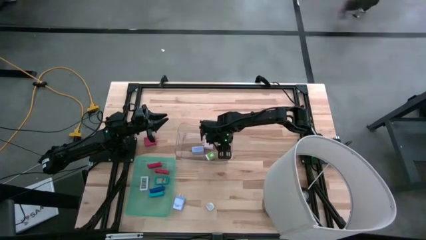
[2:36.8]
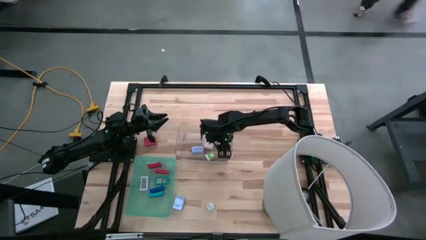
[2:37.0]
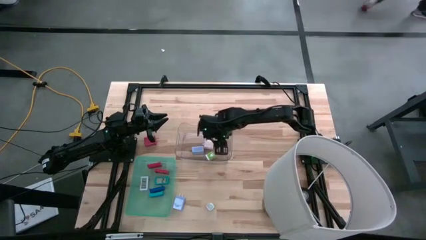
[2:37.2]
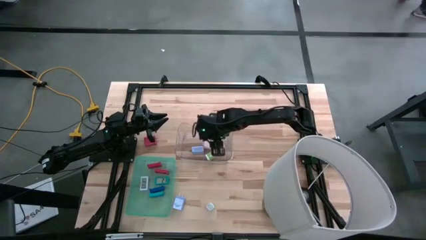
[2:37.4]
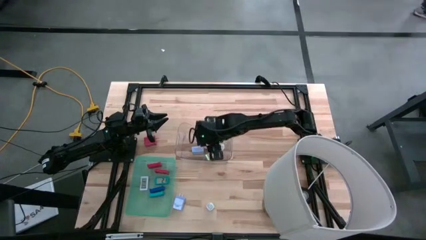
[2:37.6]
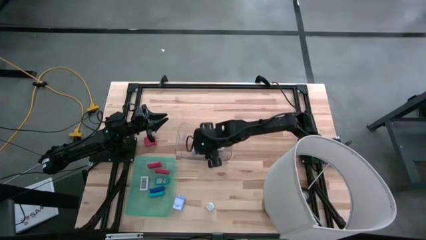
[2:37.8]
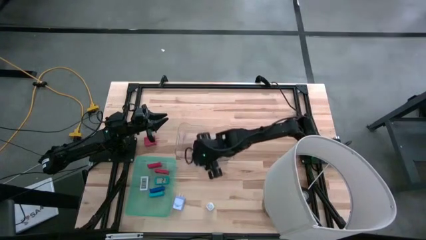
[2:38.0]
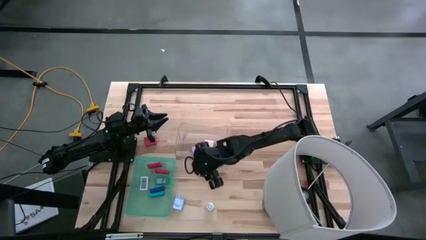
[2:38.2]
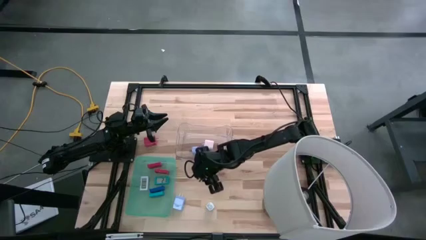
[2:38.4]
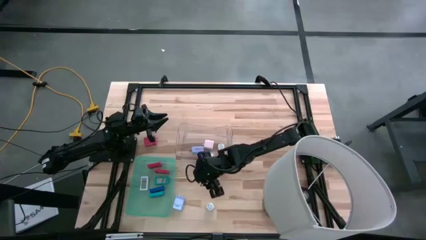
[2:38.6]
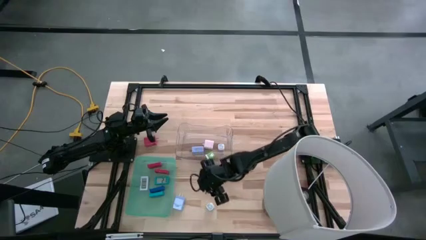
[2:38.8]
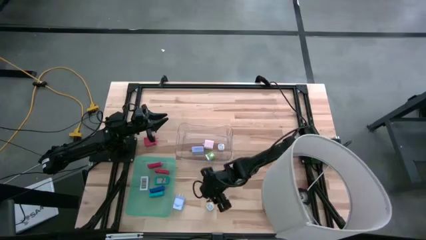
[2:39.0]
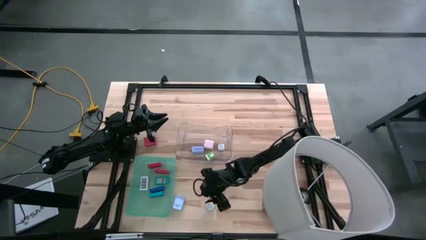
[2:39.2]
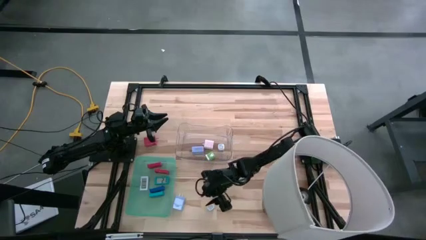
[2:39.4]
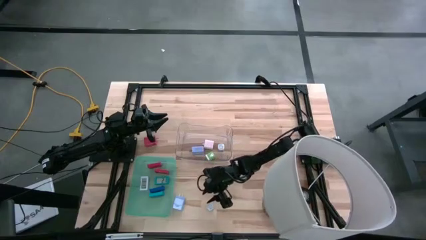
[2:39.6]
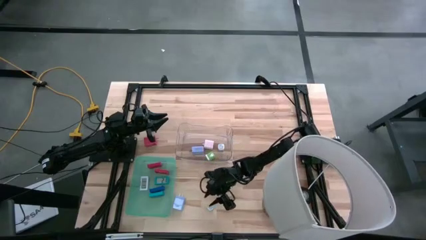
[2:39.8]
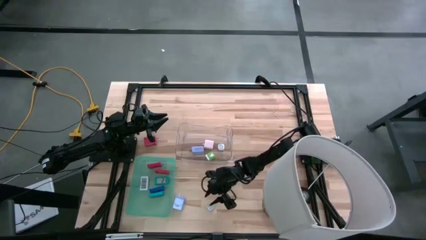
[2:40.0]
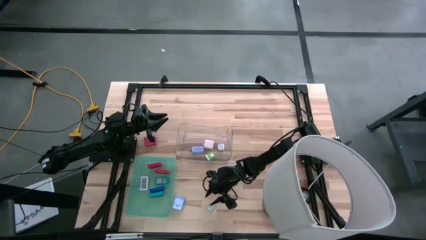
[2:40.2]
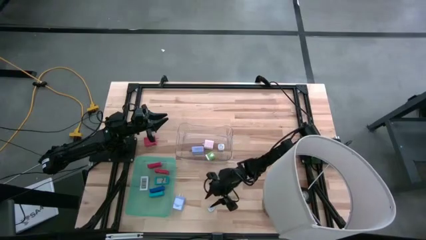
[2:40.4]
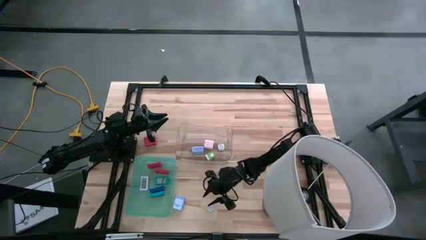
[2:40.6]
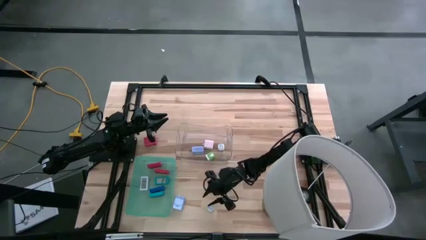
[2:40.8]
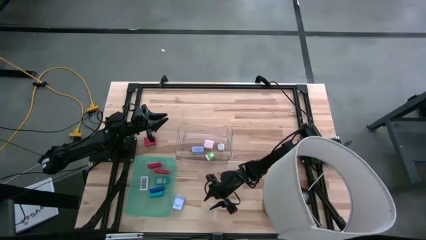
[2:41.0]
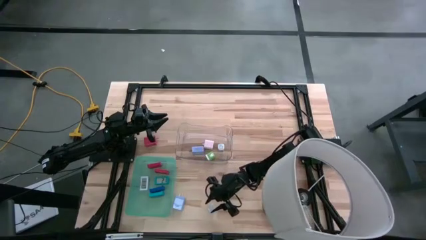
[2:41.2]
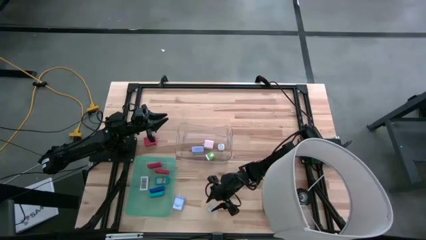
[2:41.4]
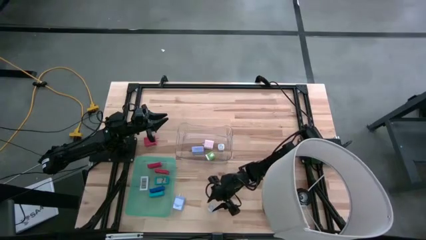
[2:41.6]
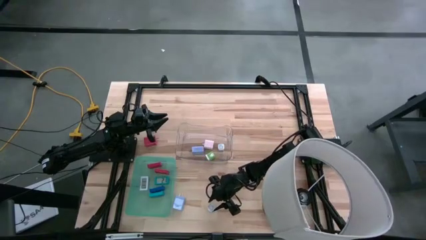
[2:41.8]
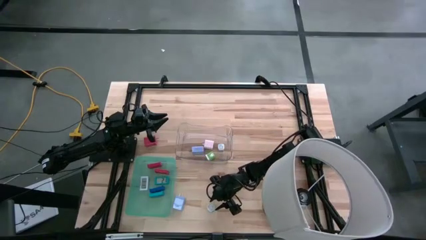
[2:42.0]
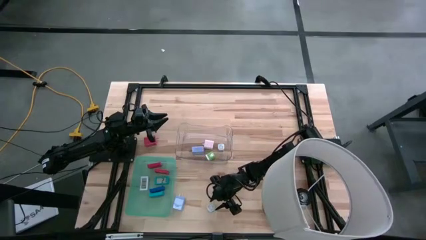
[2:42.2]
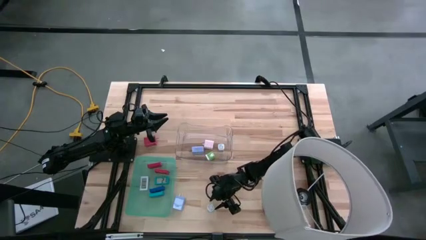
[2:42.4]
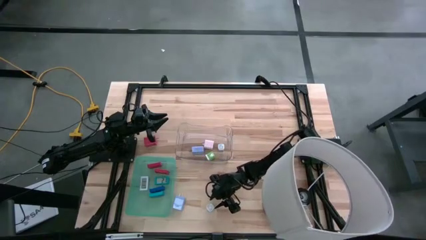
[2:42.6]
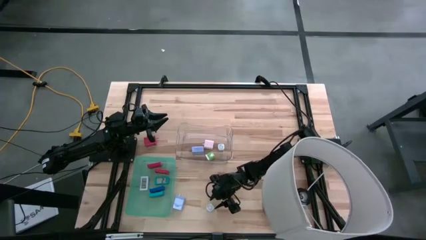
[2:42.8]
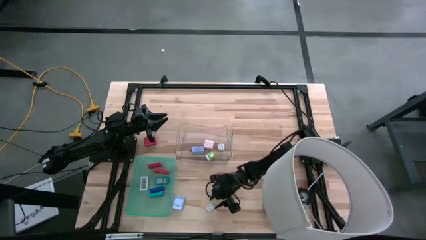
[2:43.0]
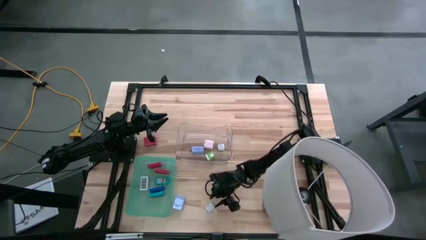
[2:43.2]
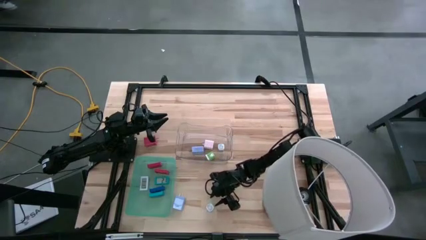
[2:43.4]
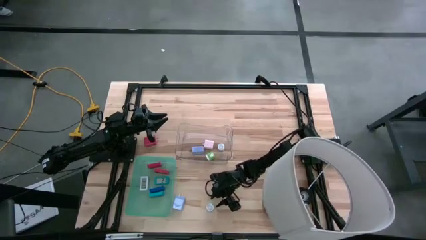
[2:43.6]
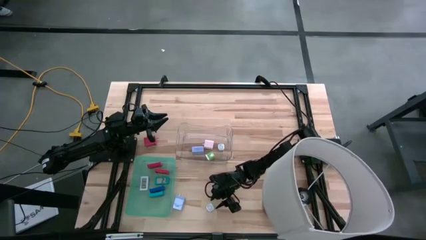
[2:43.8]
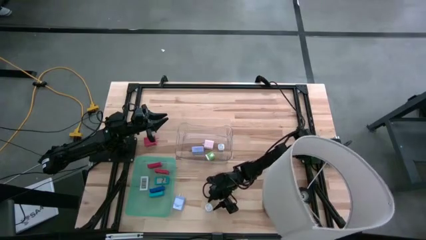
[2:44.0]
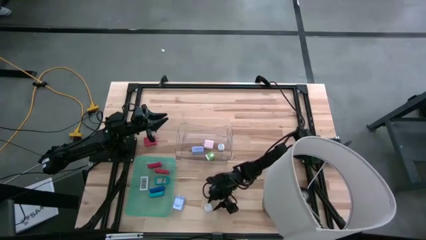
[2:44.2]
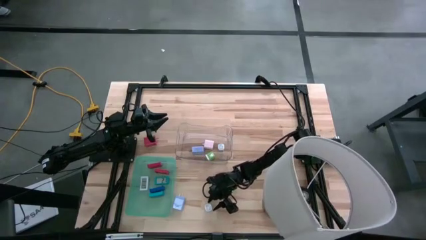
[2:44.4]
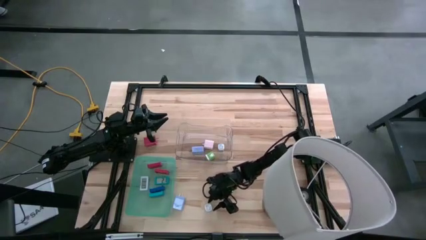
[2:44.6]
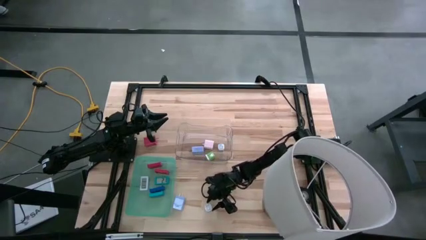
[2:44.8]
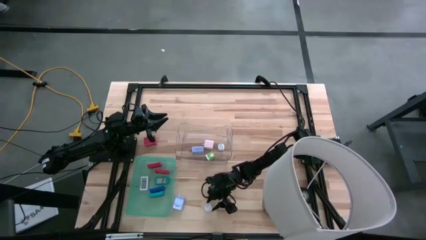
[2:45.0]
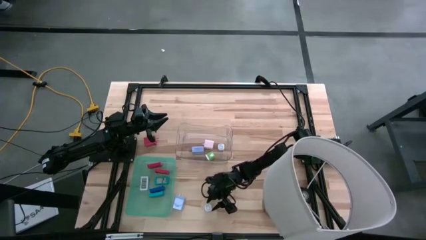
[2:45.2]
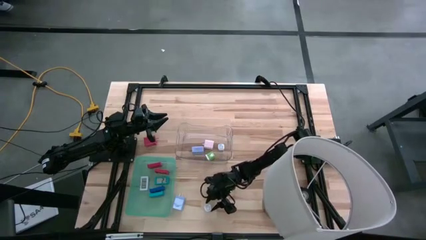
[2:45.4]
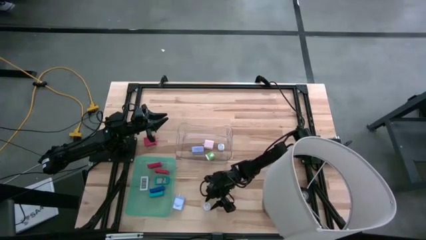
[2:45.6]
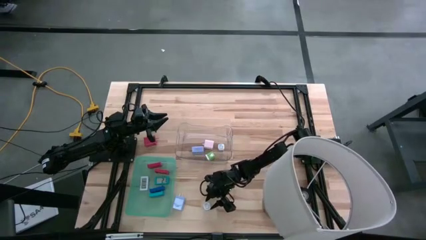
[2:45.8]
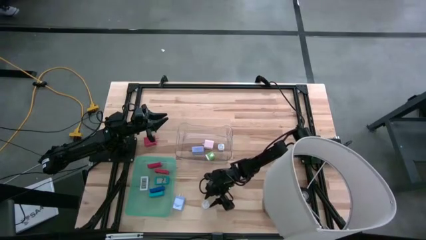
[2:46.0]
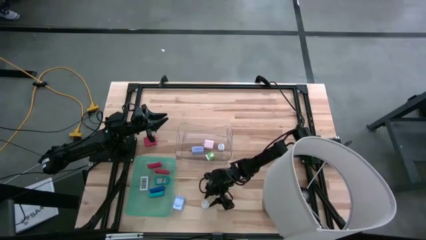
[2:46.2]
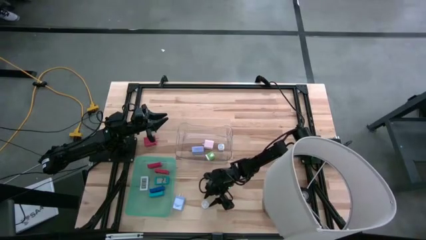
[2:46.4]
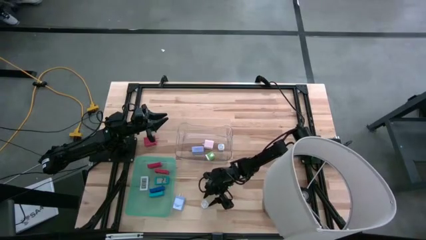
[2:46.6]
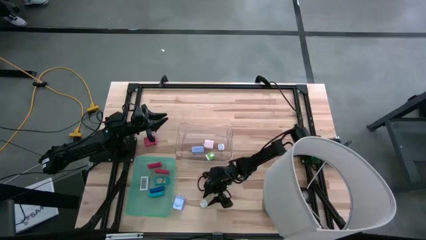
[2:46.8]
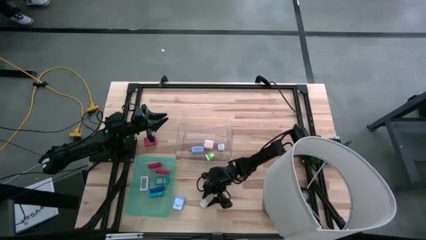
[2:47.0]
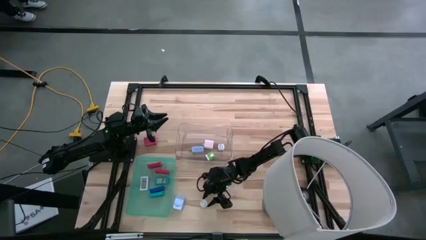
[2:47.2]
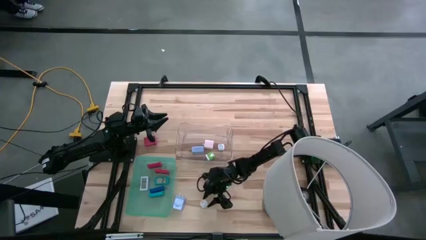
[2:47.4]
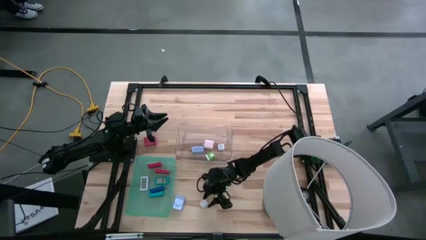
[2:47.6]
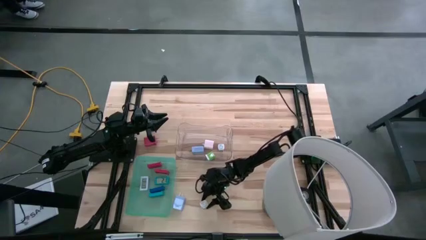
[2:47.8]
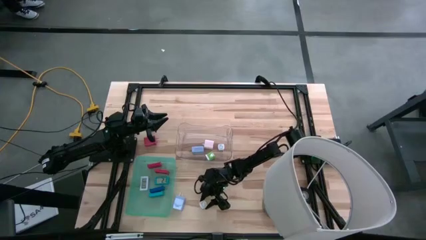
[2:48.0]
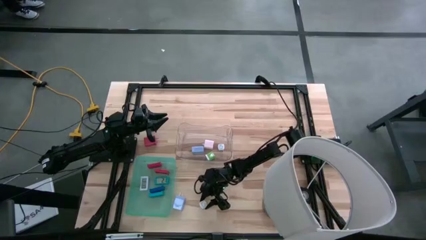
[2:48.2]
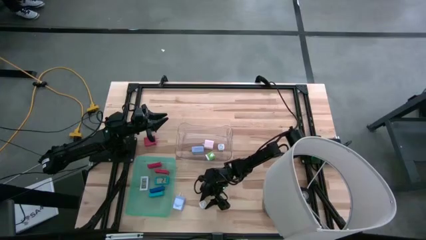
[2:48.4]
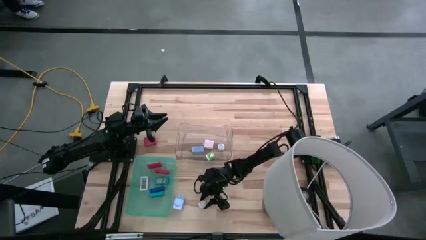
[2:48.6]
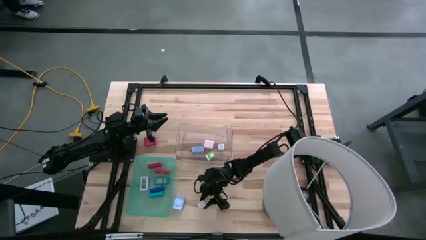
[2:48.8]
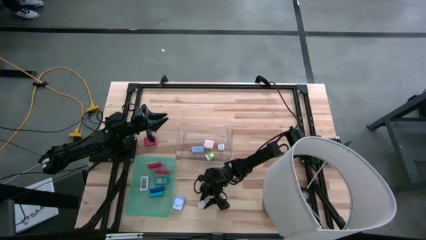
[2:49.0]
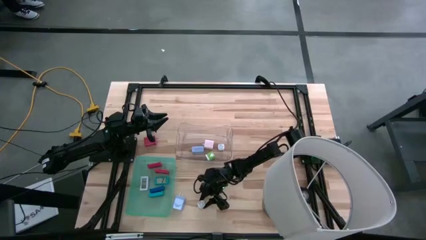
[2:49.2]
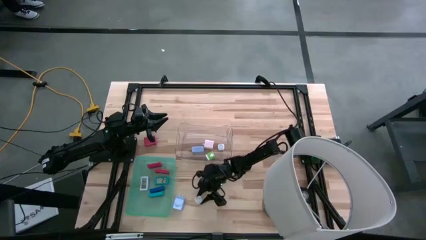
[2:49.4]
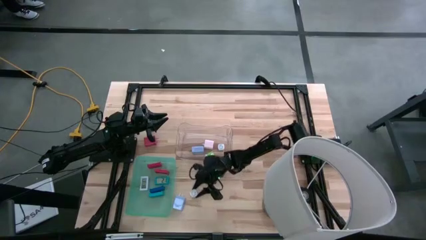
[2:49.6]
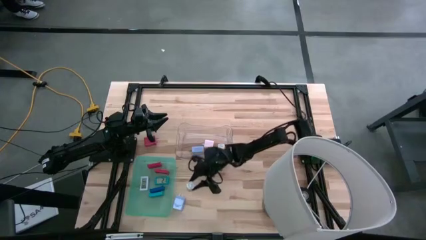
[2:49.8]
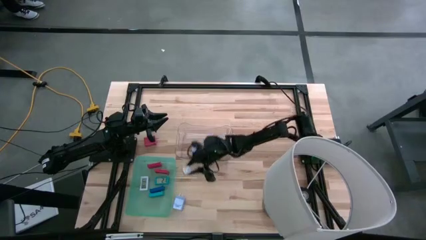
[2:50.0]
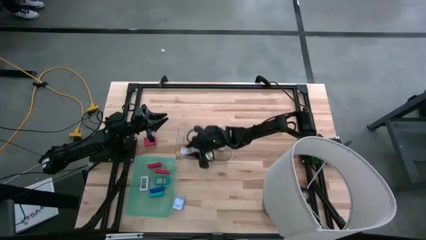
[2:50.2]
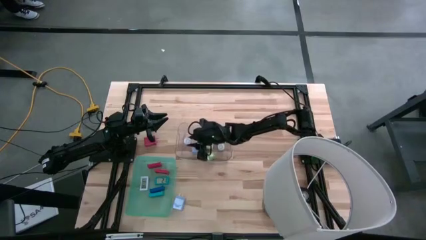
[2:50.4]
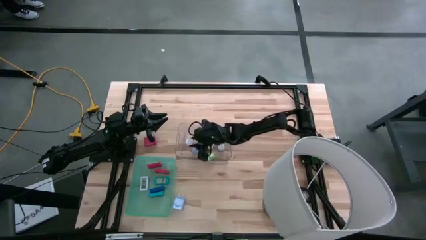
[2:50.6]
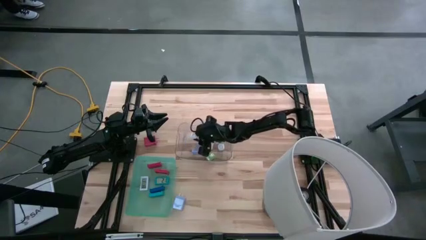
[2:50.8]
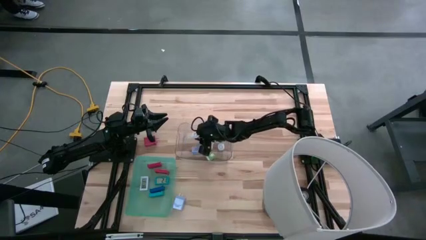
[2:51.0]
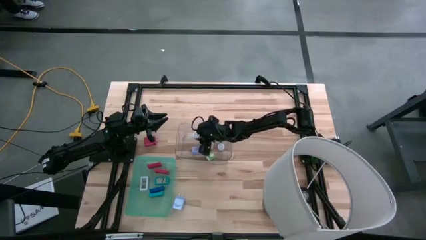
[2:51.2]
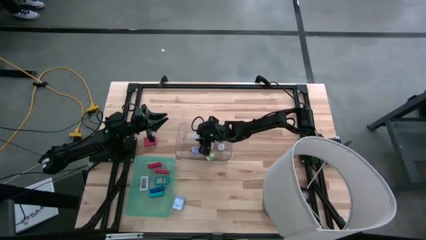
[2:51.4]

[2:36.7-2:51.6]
Task: Pick & Place Office items
Put the green charger adapter into the transparent bin
